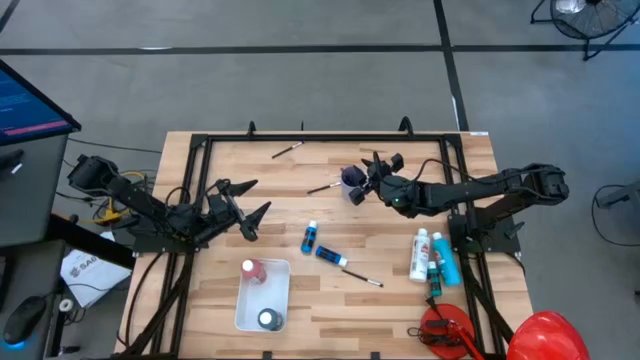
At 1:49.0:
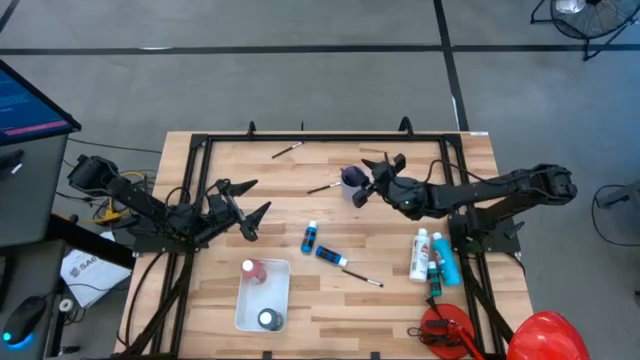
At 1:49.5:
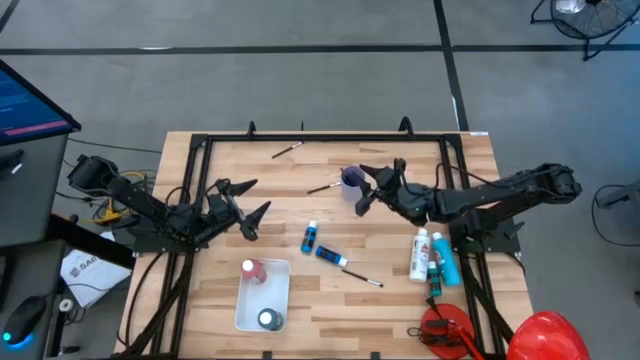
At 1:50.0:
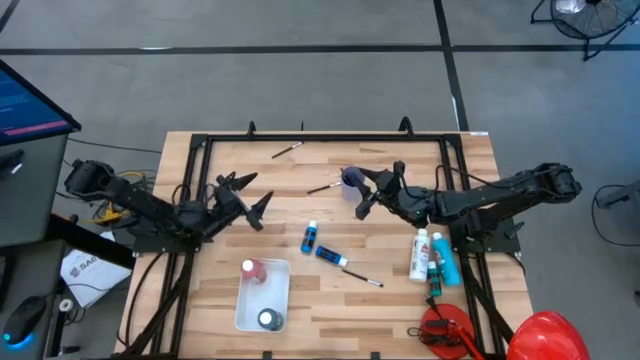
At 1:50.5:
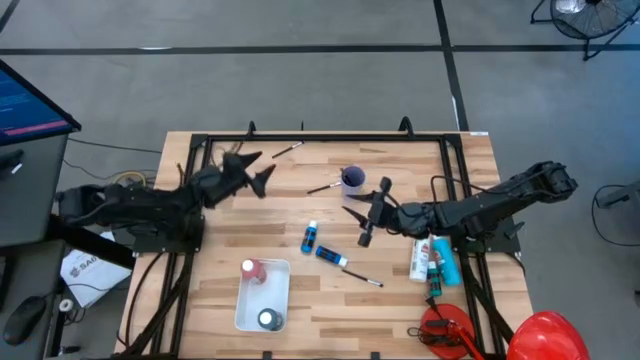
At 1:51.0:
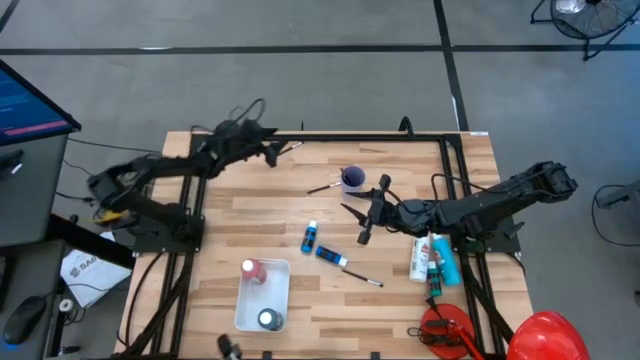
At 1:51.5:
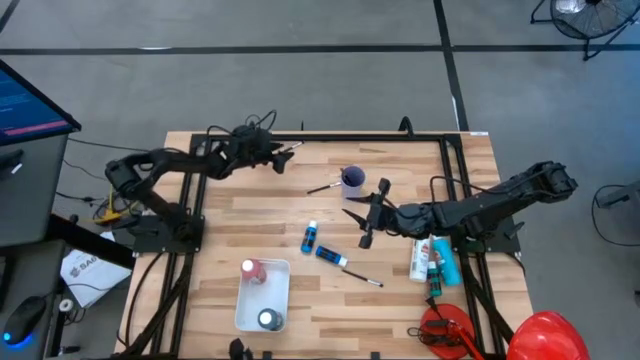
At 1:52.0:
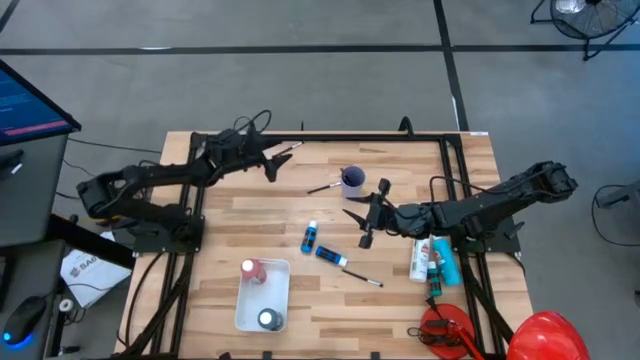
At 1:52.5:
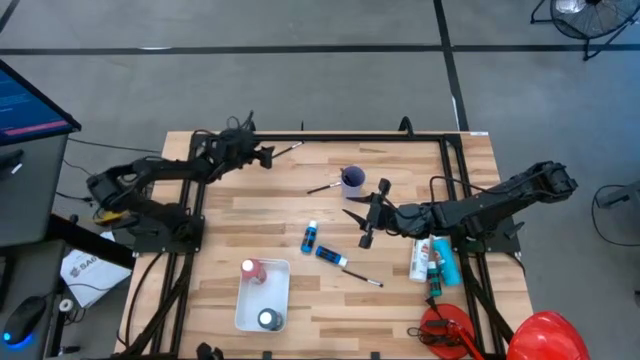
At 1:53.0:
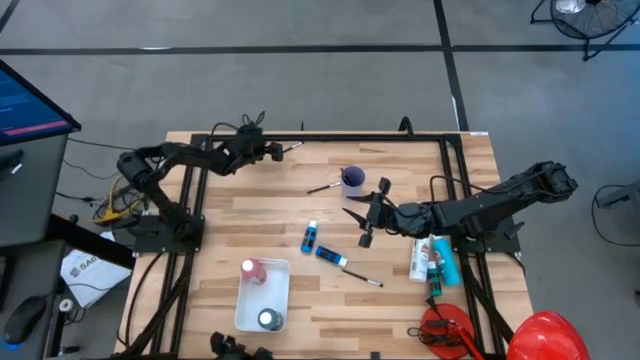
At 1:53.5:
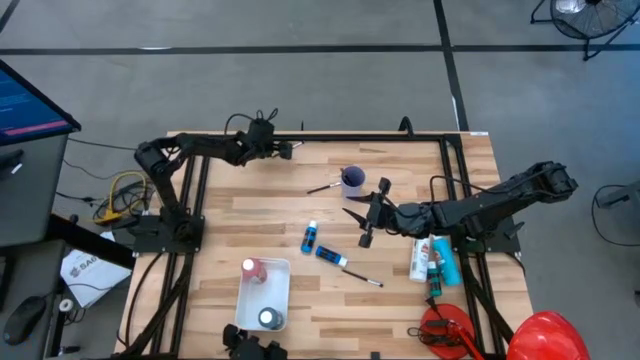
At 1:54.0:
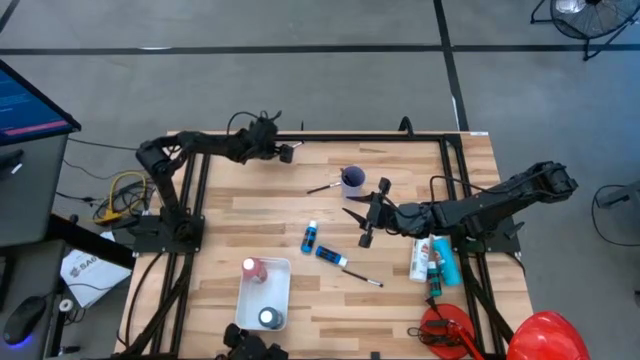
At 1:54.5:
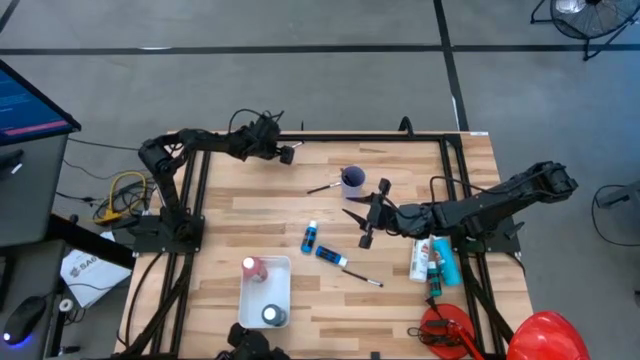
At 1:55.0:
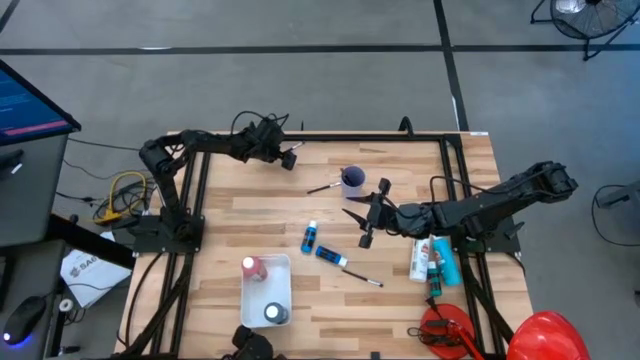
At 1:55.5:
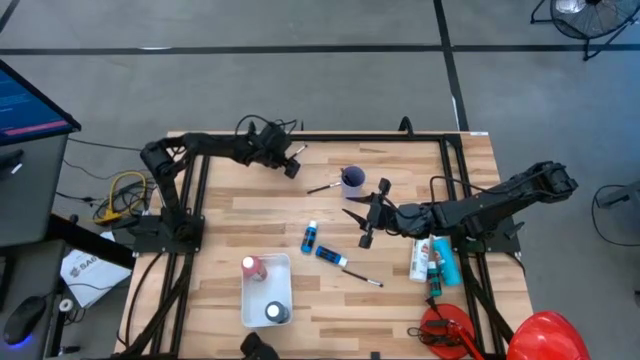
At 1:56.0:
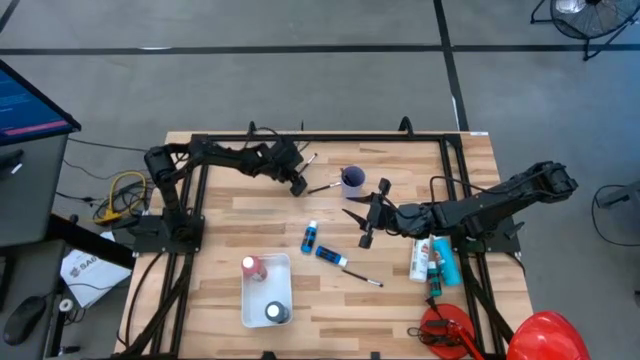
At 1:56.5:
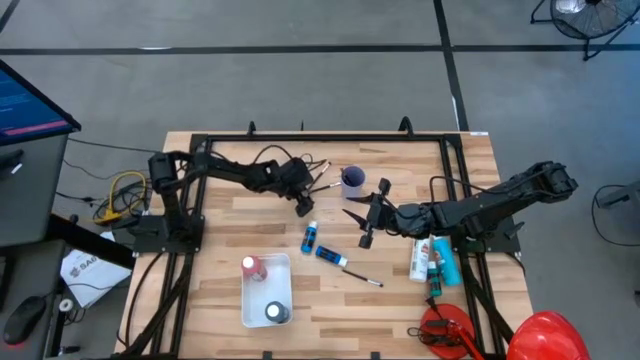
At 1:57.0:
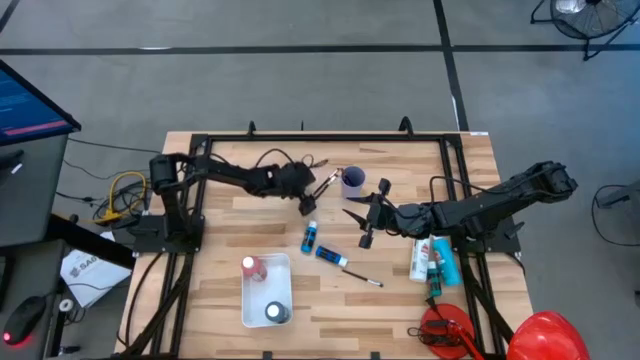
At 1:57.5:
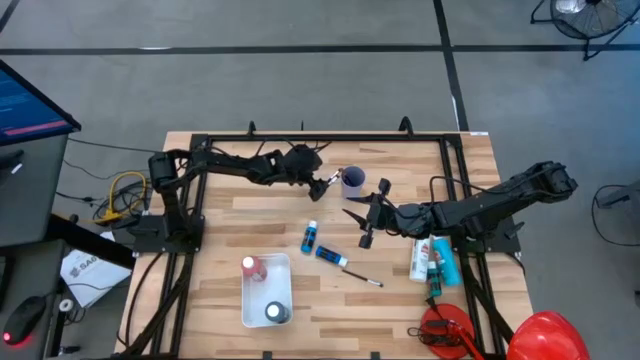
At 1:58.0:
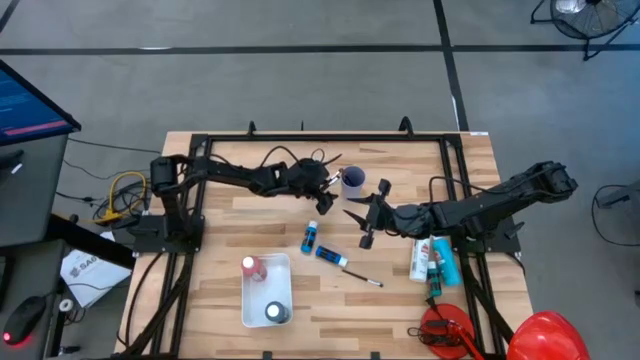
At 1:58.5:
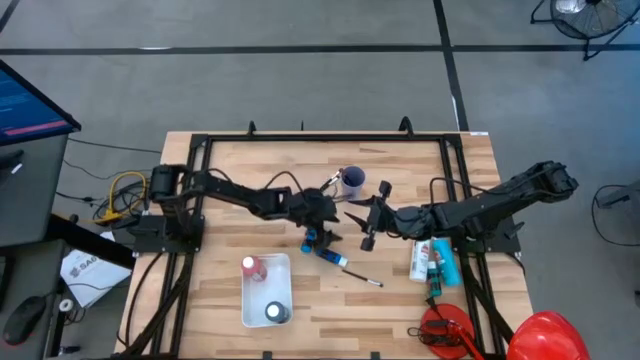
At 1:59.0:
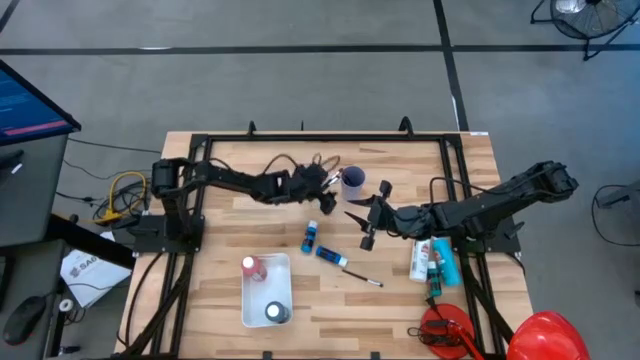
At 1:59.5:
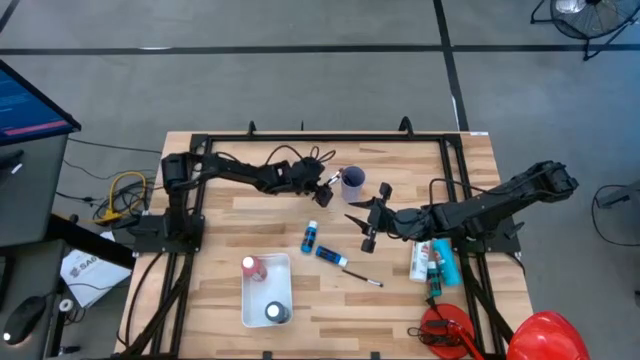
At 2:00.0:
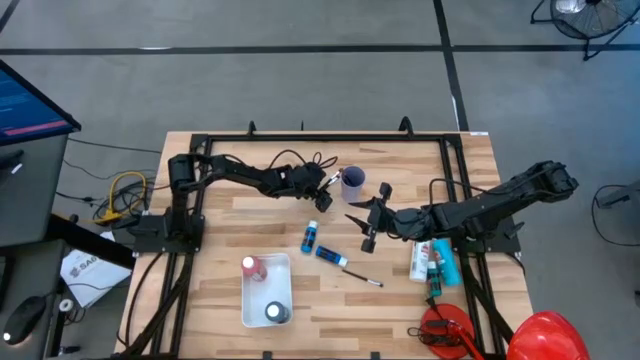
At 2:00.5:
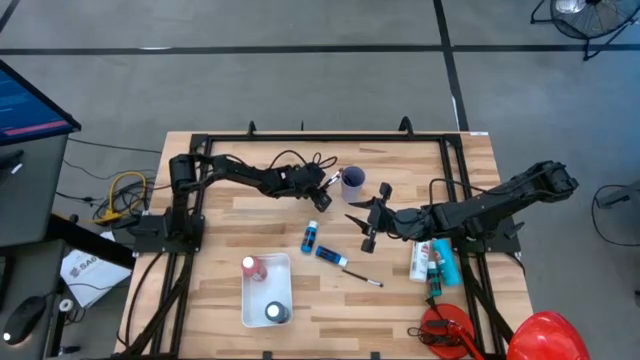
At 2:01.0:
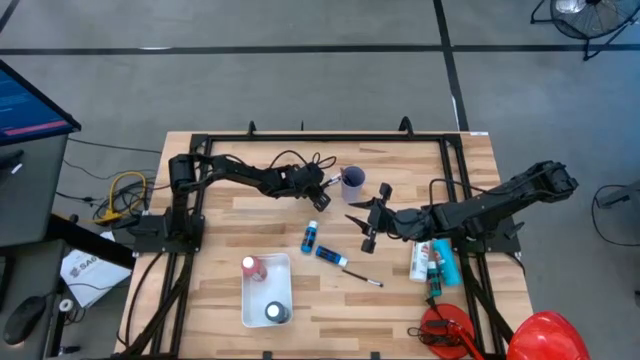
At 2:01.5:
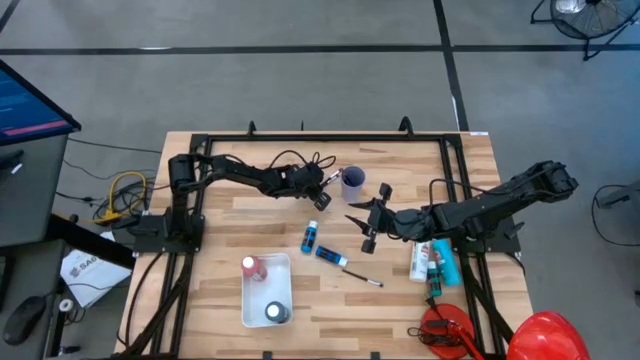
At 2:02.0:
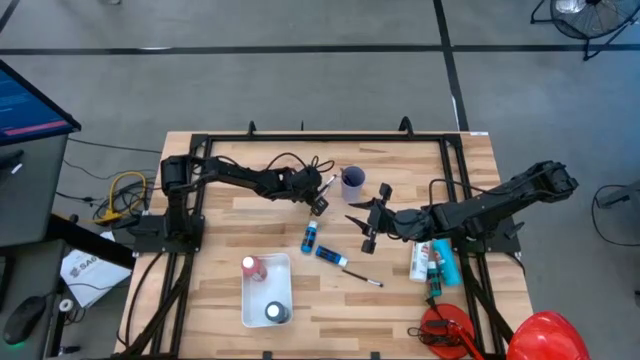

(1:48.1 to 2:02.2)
Task: Pick & Place Paint Supplies
Put the silver paint brush into the violet cup

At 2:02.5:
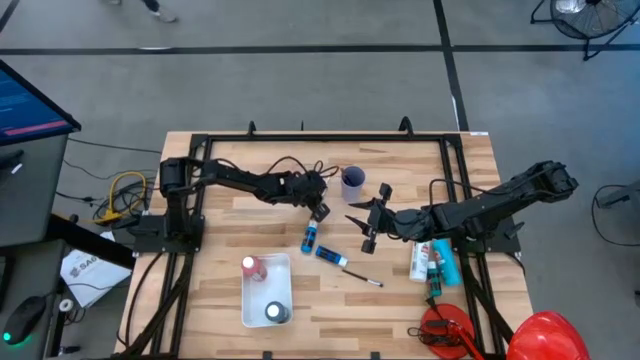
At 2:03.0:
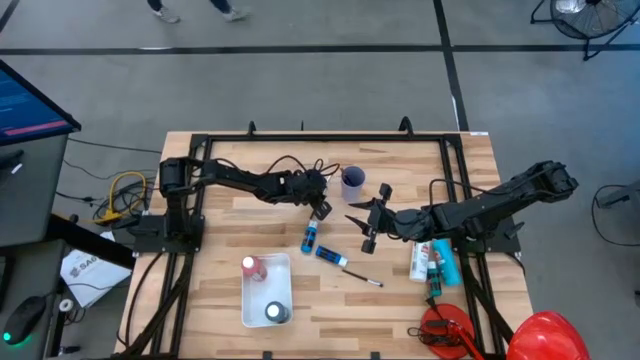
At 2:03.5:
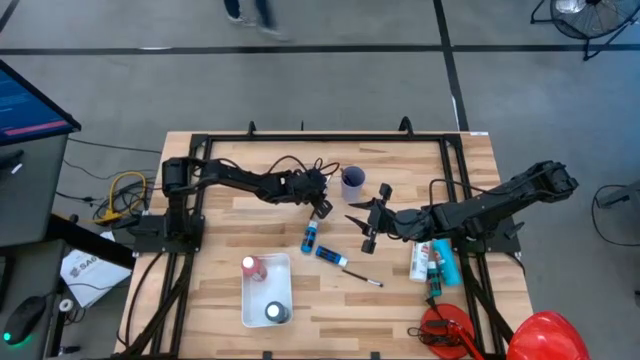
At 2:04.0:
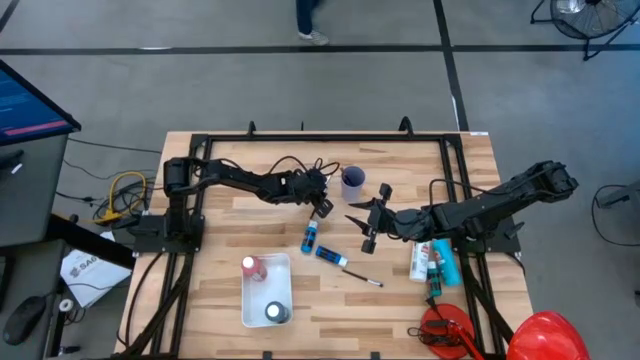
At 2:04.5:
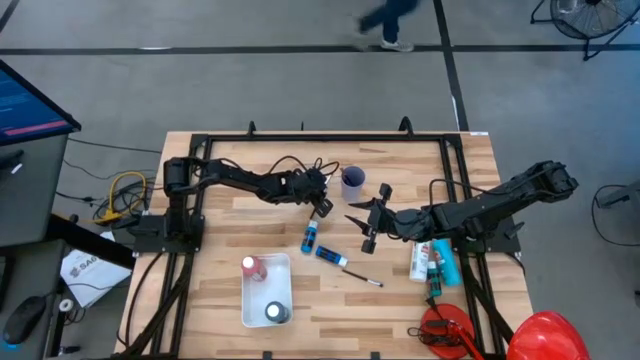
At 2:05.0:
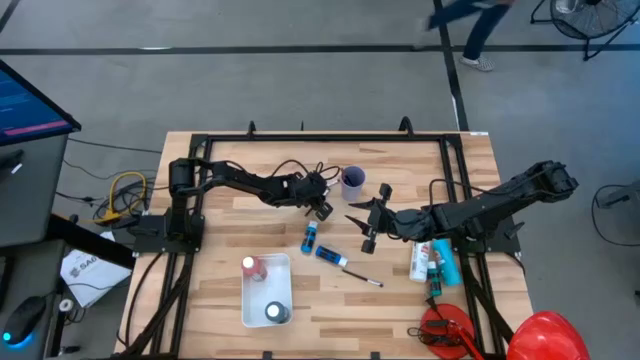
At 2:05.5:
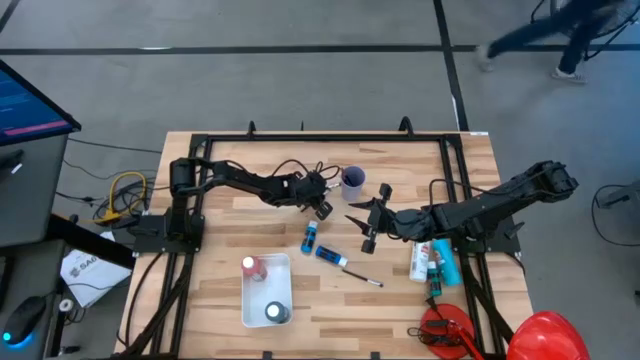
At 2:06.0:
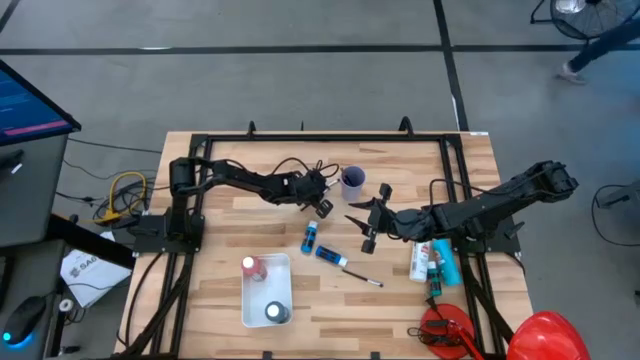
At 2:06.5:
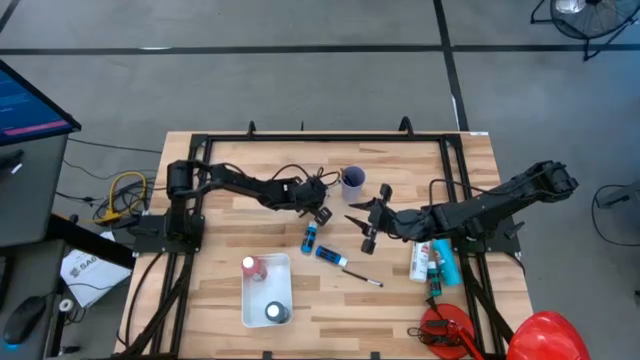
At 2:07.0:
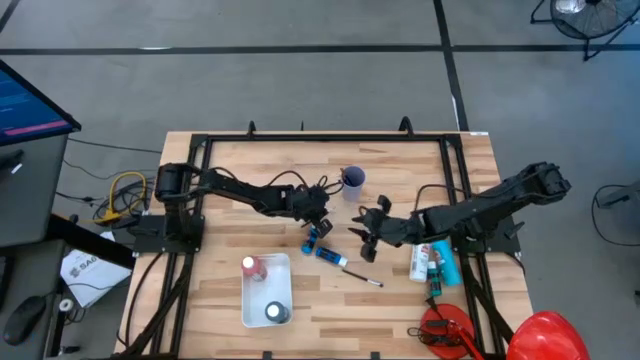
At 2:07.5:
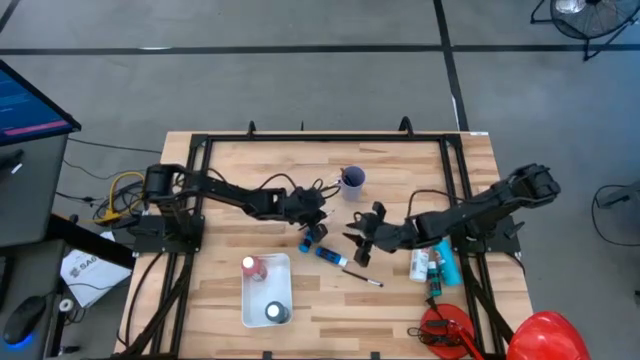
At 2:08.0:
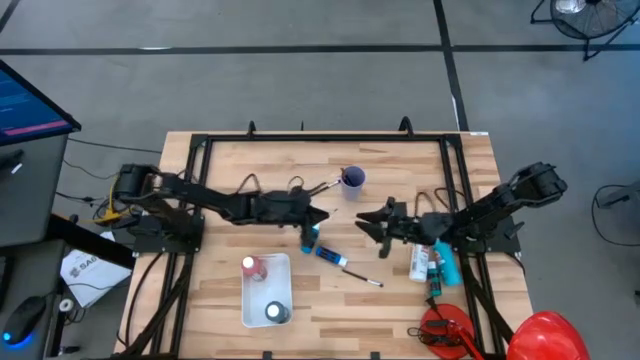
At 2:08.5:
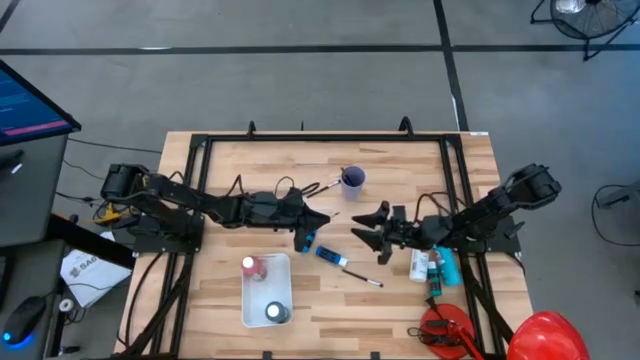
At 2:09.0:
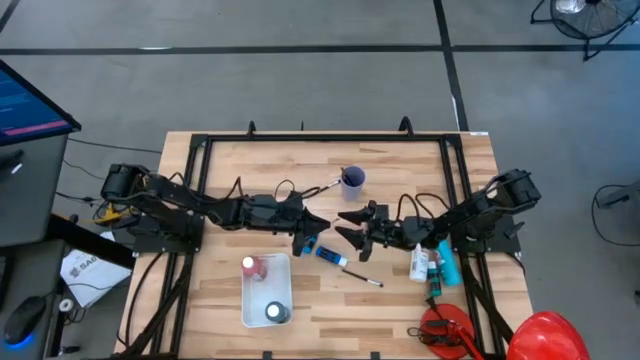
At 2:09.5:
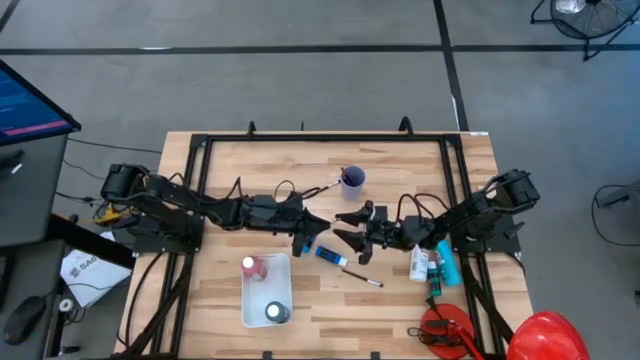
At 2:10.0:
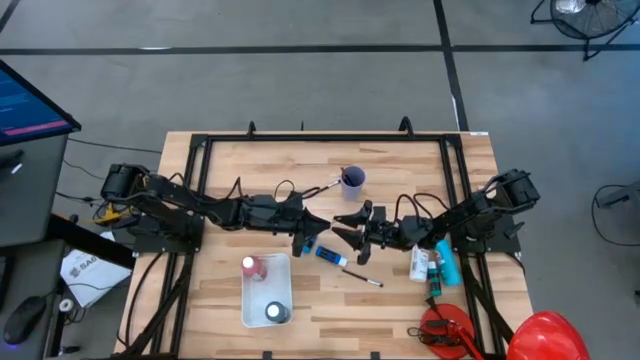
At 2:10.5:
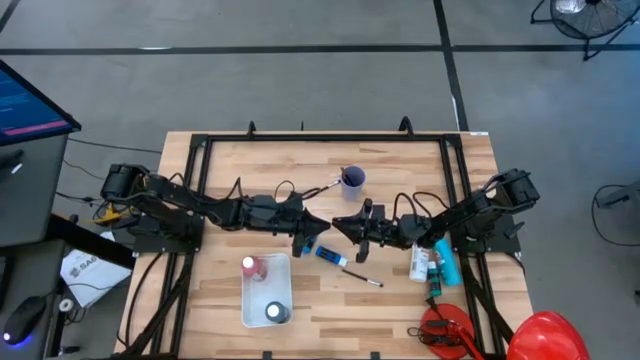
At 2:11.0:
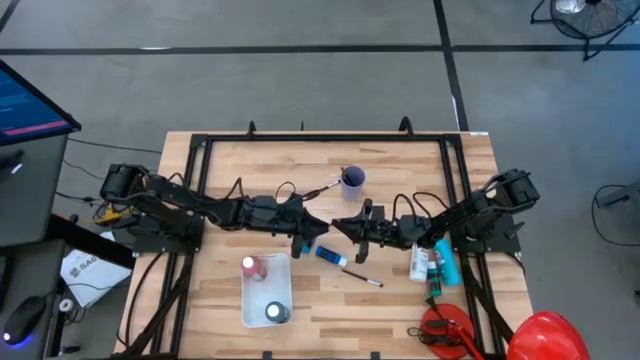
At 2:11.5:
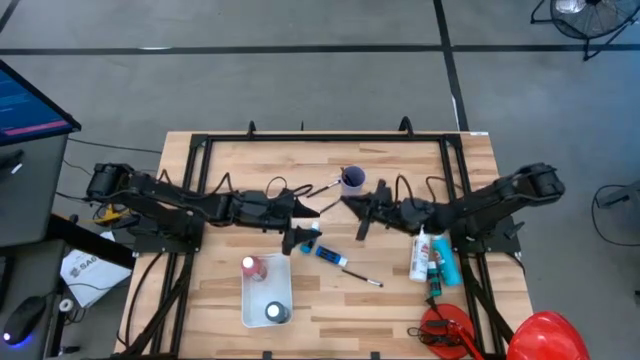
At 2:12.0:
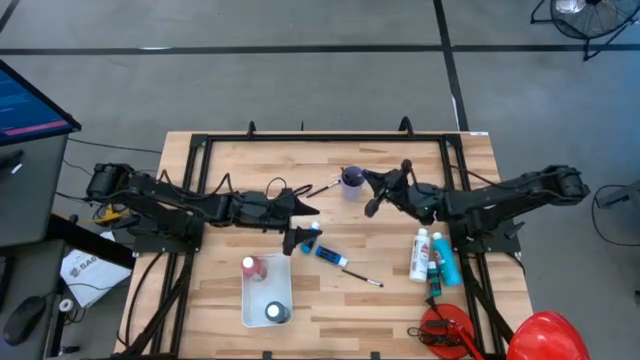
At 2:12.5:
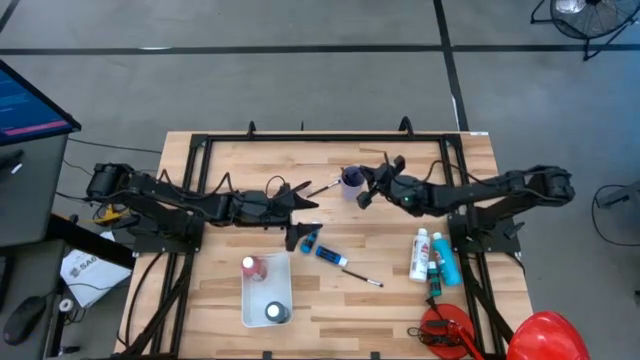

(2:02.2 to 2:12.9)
Put the silver paint brush into the violet cup
